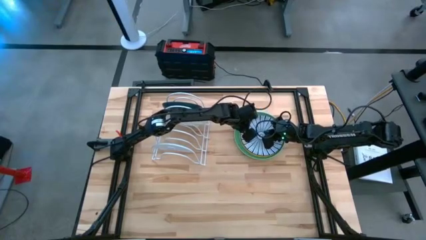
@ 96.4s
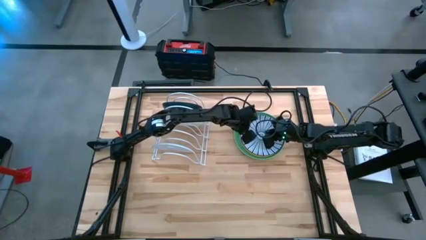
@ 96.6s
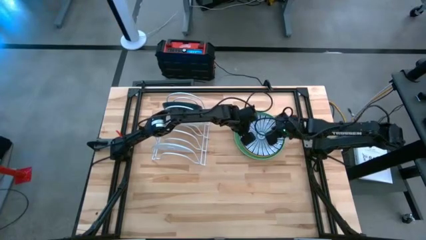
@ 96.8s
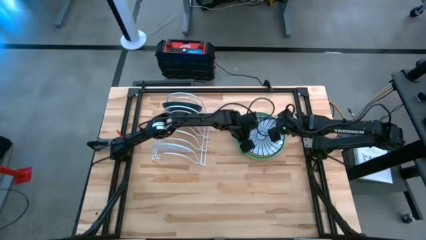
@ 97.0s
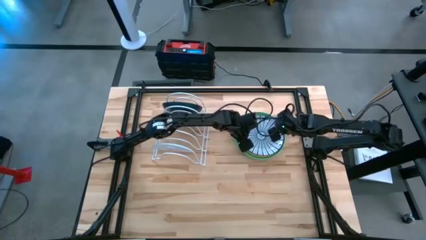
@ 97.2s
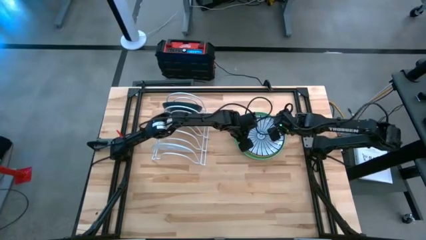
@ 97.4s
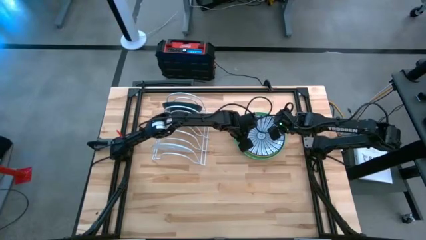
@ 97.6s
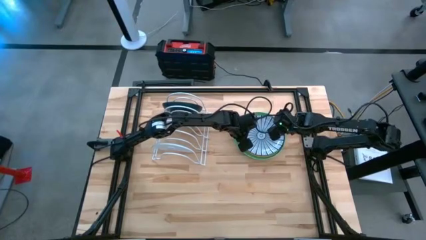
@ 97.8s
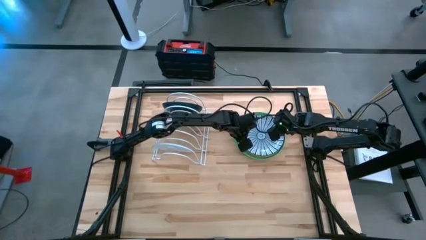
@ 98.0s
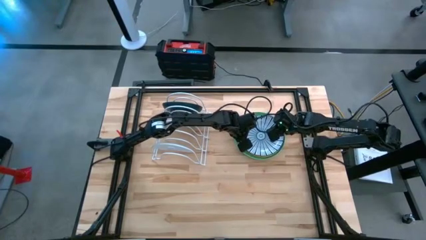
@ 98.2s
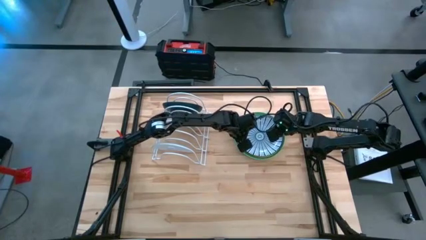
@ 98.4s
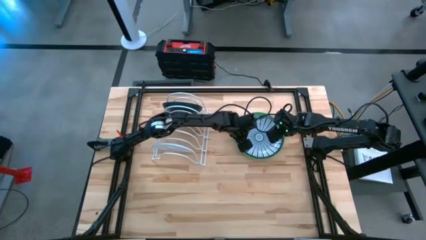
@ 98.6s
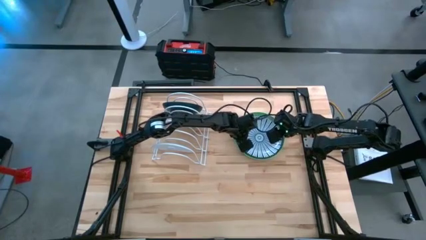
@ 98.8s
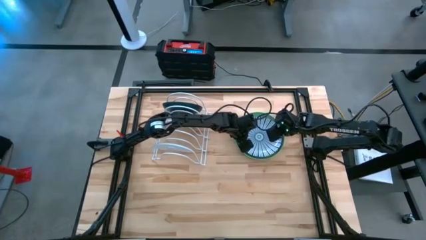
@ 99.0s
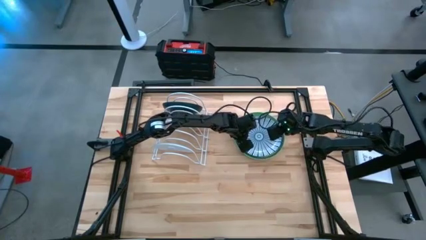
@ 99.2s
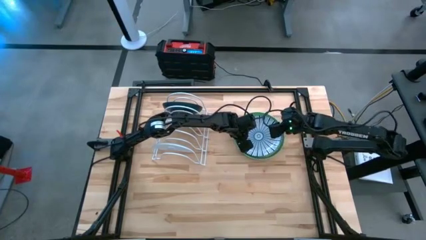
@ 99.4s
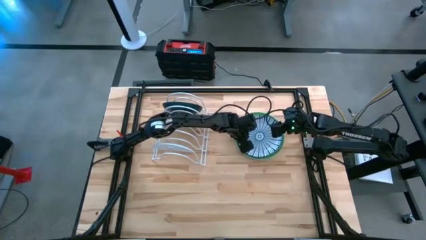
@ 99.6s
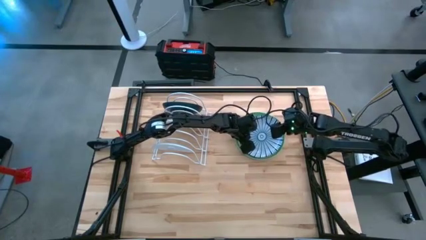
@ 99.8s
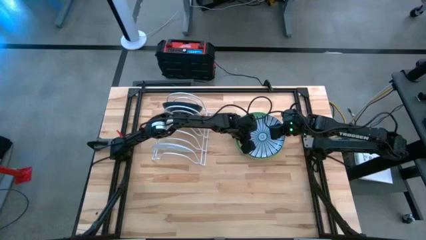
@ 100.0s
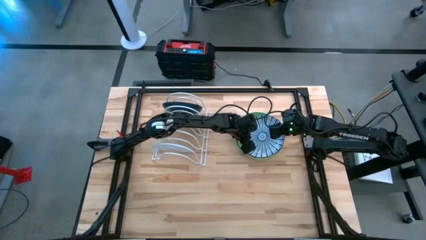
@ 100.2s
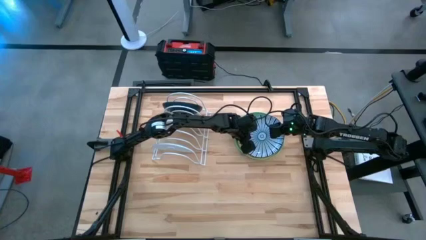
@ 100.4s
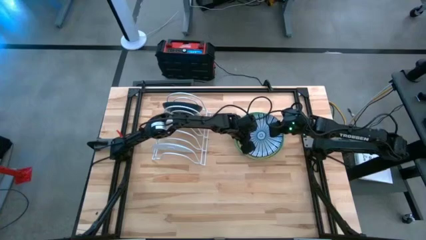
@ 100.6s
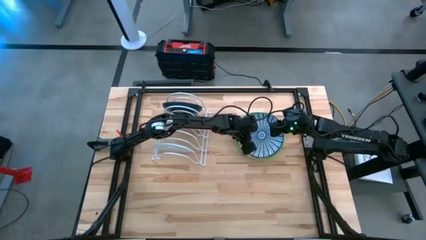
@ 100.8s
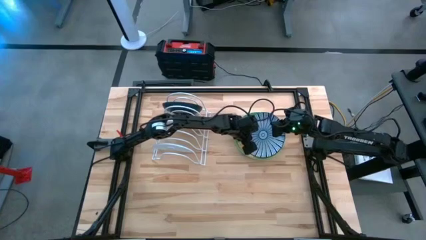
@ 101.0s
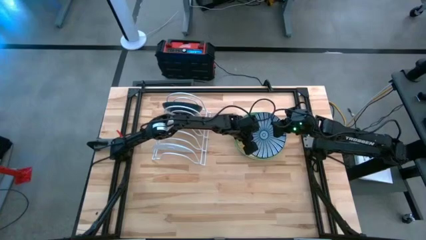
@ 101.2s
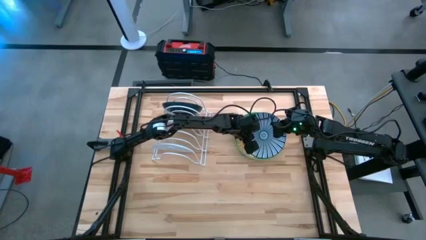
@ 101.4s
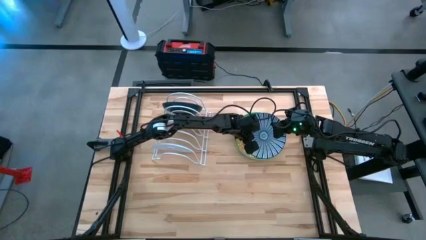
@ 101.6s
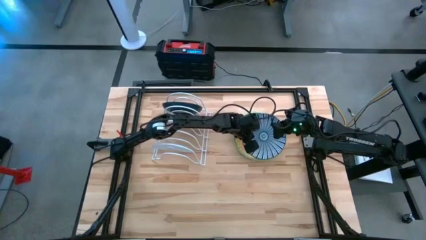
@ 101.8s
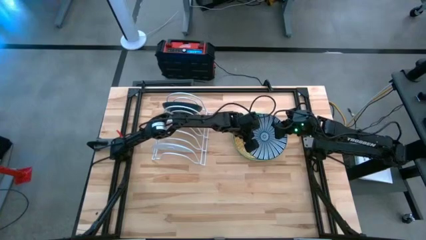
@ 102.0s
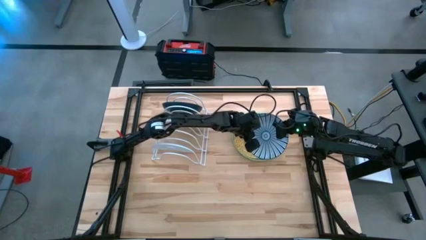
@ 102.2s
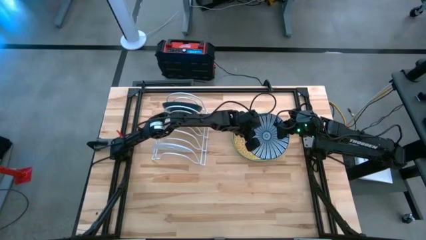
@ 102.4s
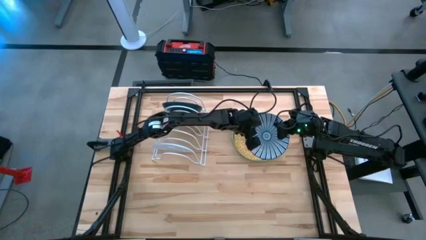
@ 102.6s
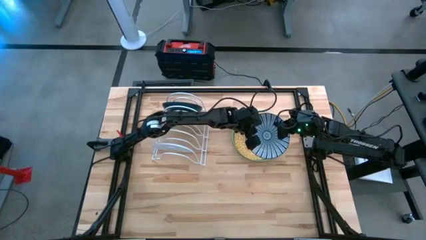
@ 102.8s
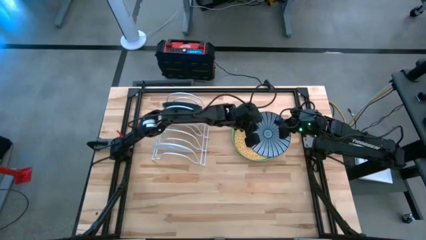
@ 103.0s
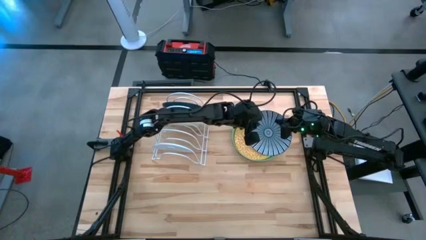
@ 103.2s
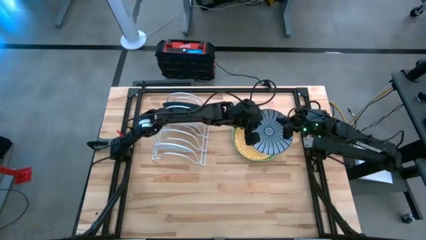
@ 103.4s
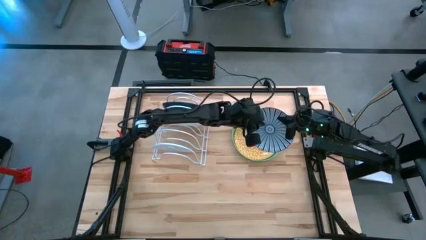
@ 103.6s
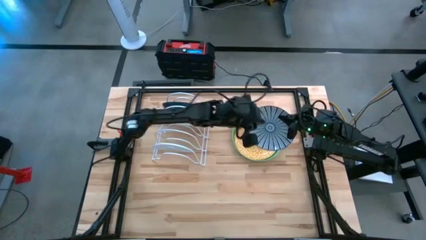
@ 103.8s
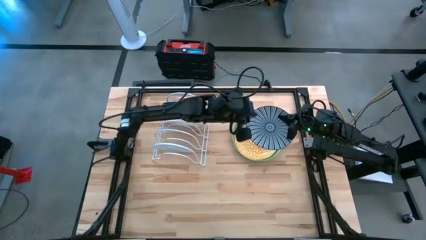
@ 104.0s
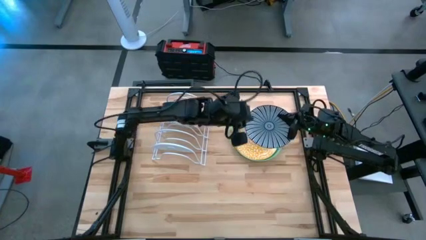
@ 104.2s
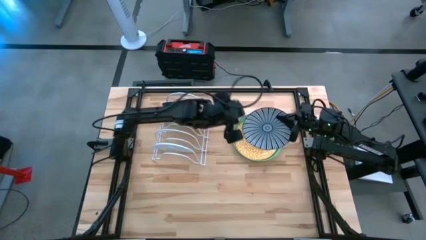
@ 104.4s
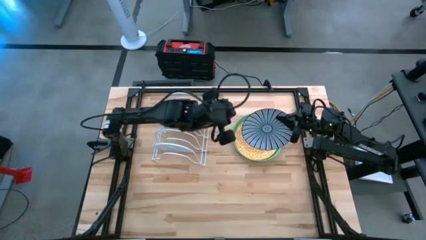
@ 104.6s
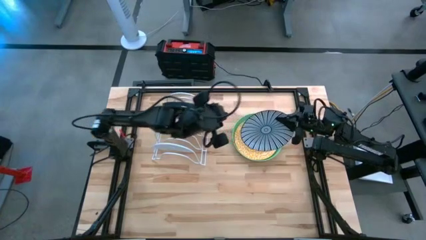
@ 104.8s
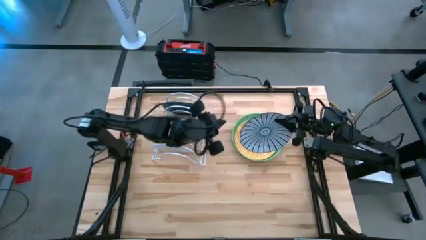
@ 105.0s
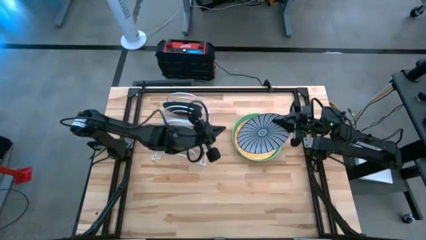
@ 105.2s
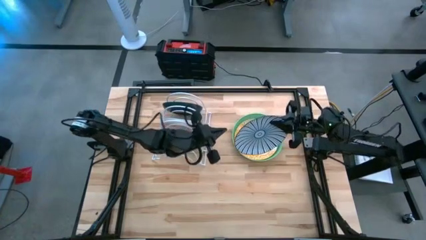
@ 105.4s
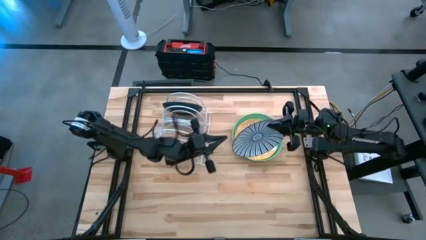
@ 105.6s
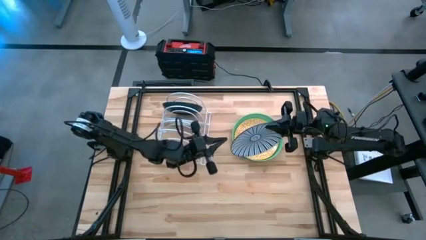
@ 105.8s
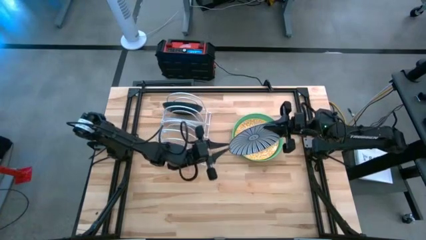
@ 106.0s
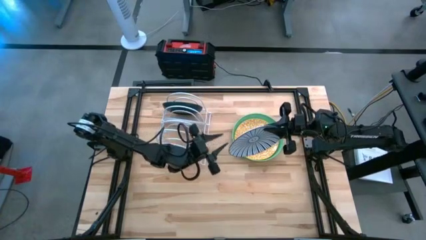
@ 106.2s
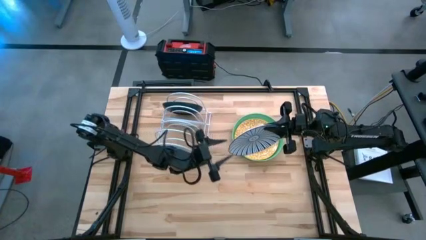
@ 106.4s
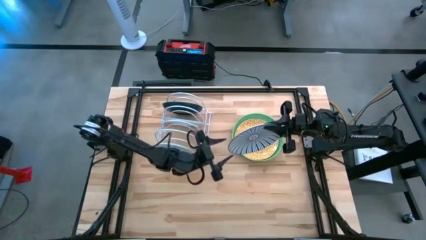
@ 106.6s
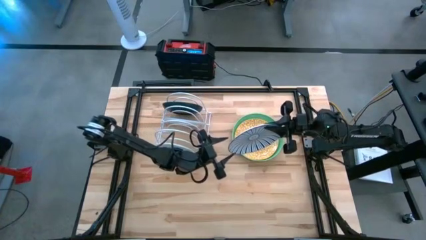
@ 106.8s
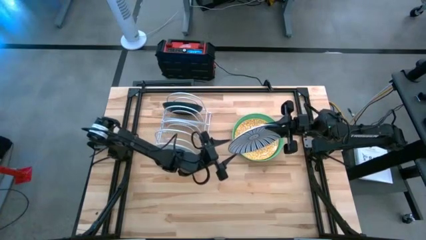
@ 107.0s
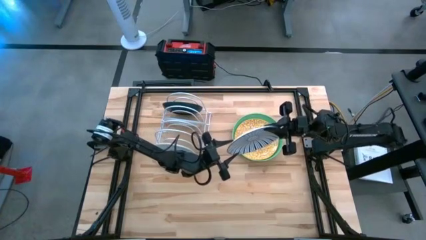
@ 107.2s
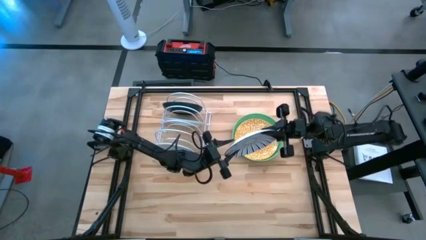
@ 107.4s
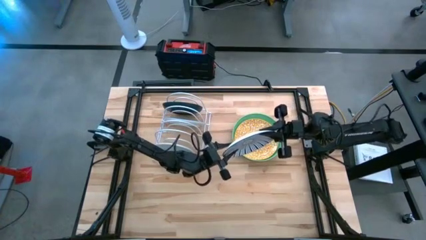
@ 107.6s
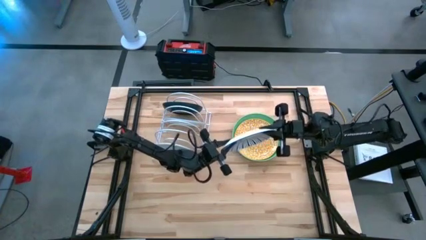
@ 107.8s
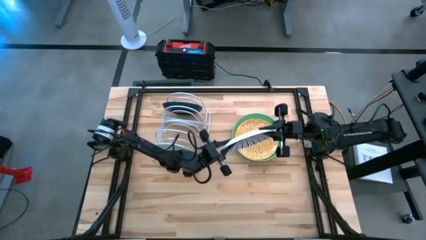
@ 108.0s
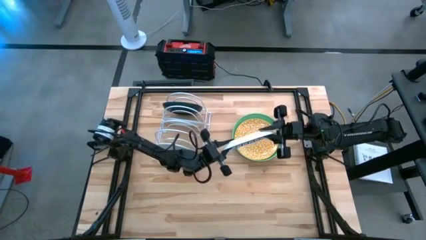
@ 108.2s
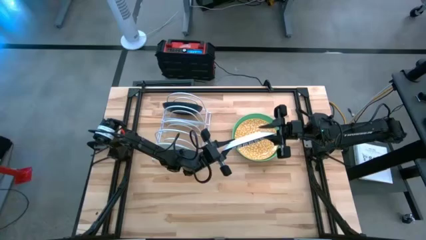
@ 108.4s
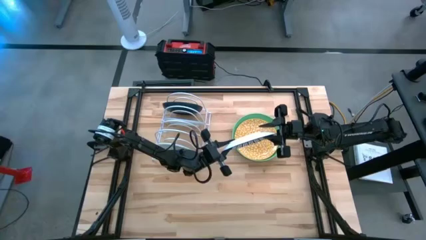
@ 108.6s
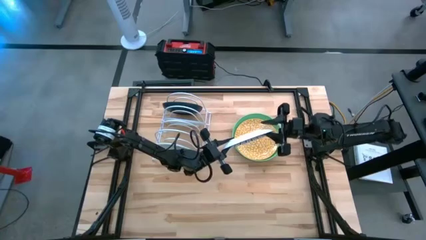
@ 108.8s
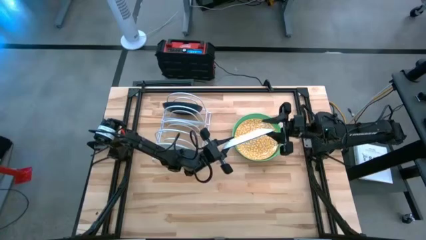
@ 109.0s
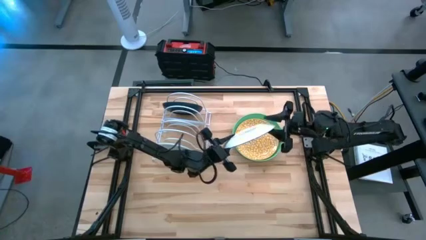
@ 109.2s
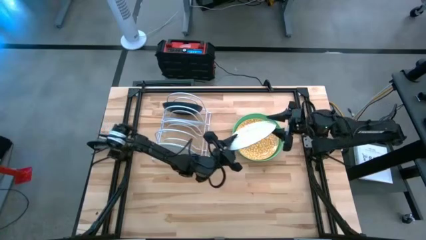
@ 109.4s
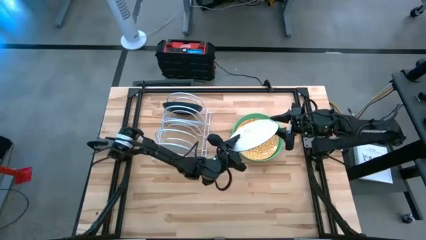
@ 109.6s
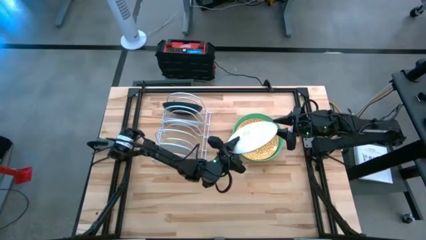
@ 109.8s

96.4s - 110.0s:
Task: Sort dishes
Put the blue pattern plate in the dish rack

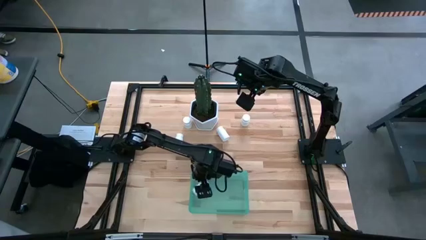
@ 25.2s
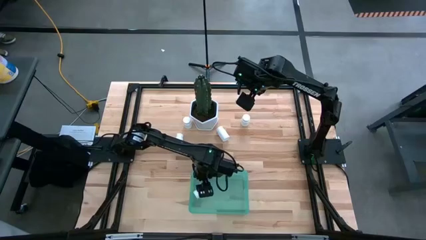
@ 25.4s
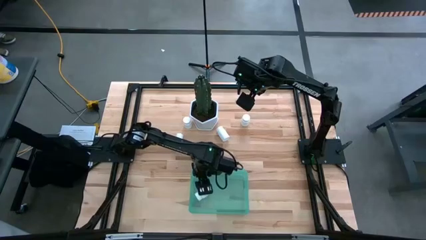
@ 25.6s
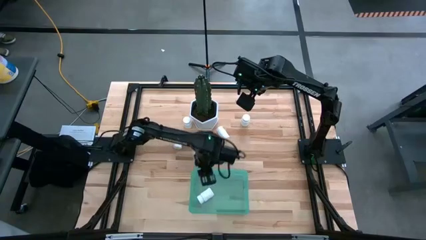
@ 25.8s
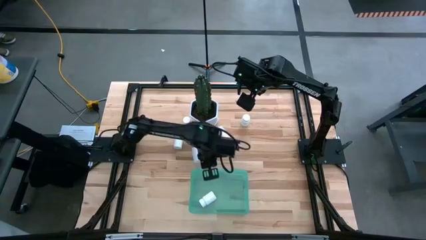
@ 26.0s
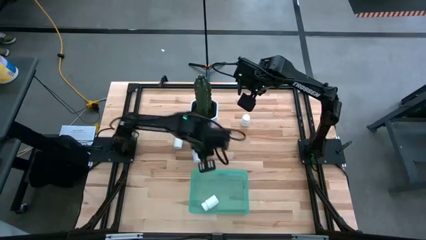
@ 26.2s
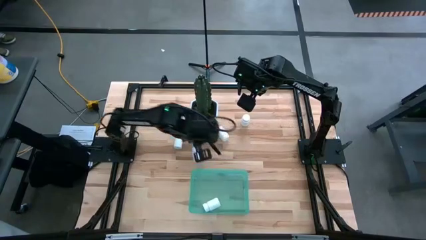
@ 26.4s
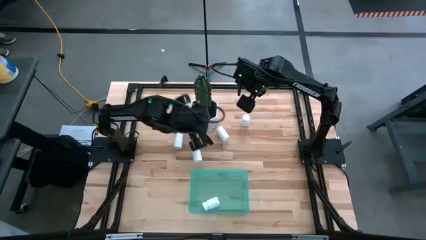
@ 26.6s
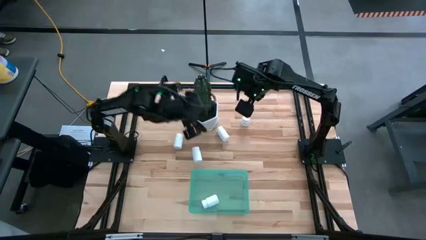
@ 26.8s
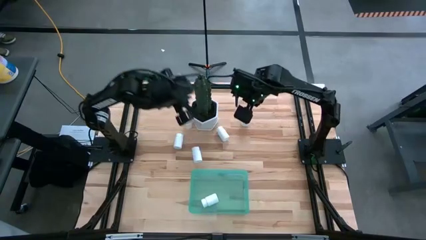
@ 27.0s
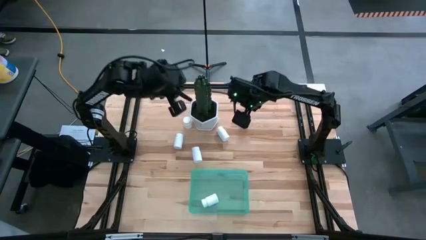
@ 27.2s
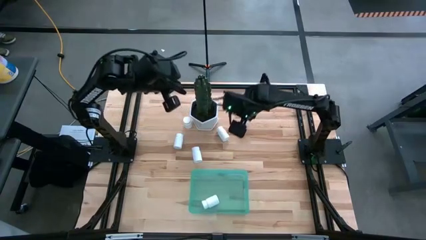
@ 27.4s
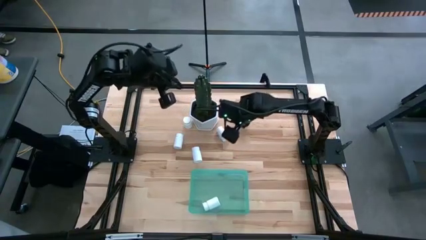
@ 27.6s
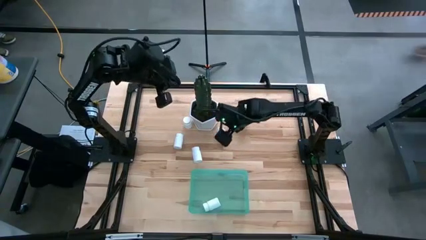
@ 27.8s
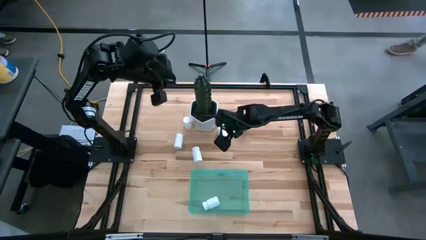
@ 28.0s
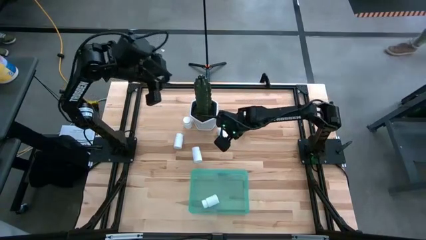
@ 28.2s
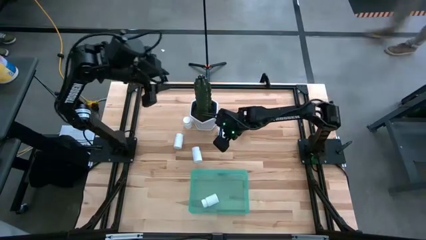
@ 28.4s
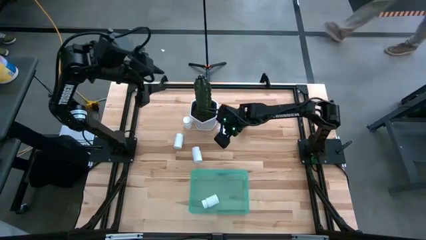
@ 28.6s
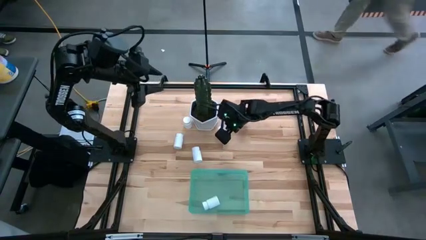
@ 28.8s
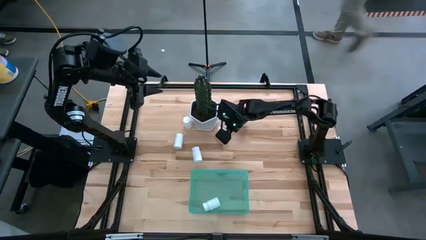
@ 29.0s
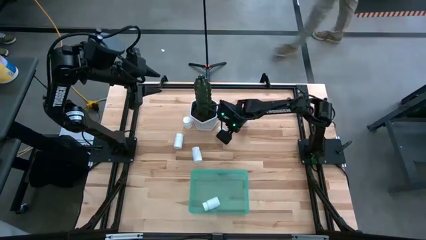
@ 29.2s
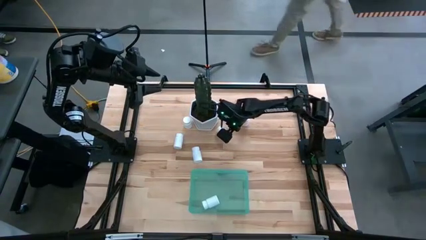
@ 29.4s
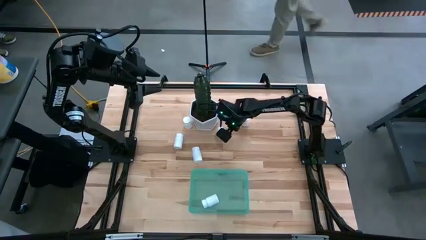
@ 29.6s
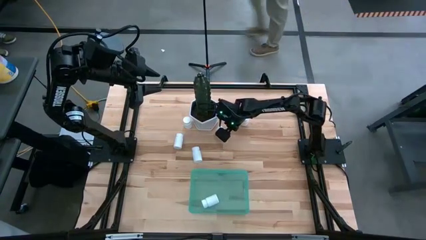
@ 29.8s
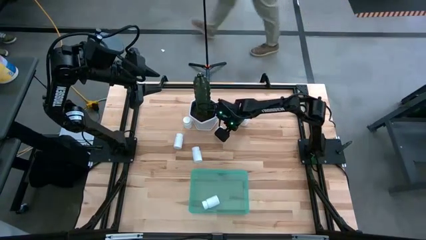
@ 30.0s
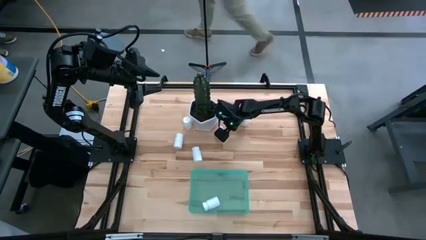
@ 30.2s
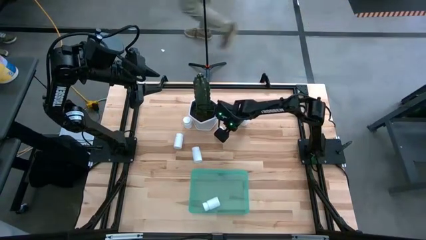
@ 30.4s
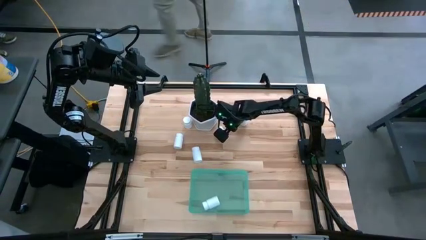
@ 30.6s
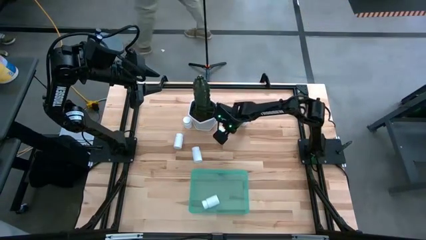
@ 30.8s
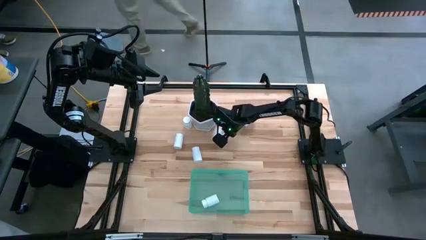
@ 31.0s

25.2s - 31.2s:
Task: Pick and place pill bottles into a basket
Put the white pill bottle into the green bin
